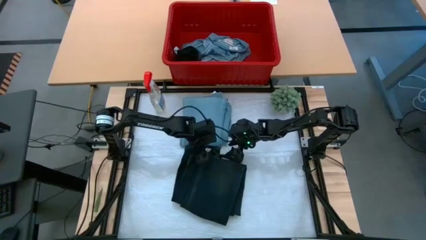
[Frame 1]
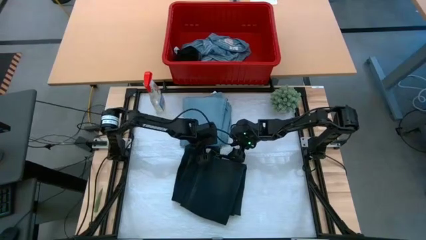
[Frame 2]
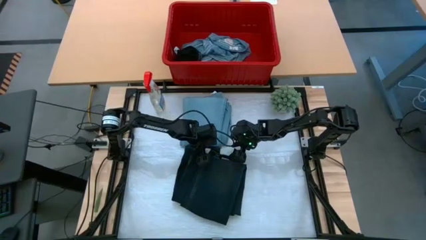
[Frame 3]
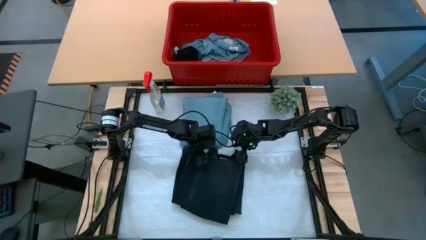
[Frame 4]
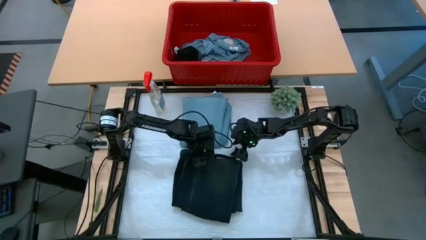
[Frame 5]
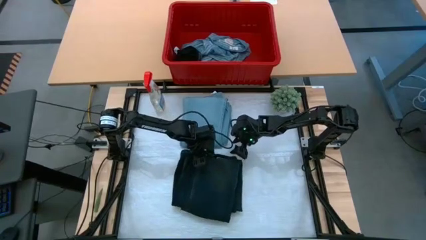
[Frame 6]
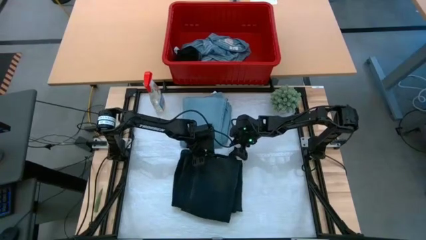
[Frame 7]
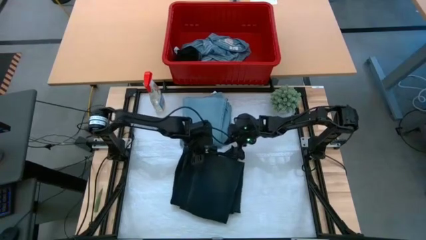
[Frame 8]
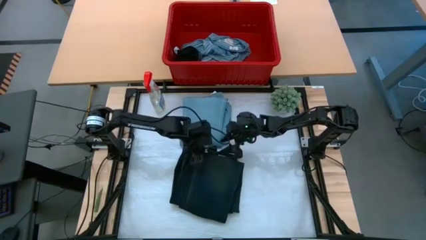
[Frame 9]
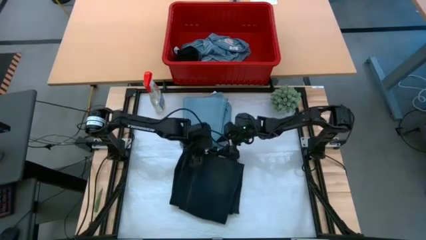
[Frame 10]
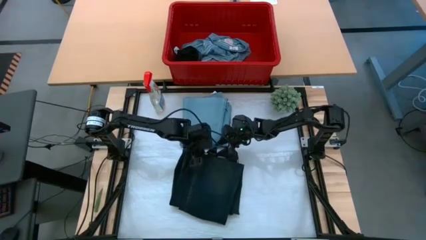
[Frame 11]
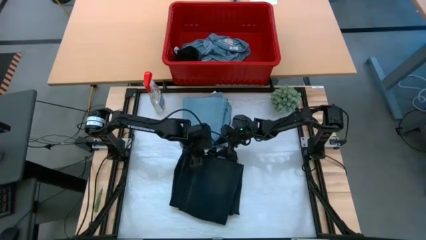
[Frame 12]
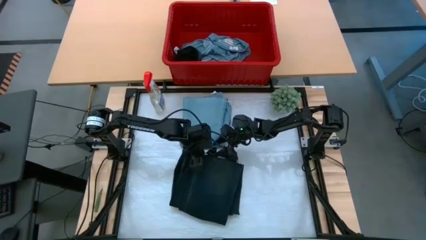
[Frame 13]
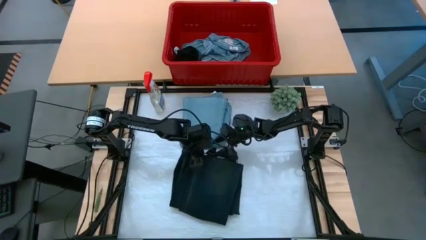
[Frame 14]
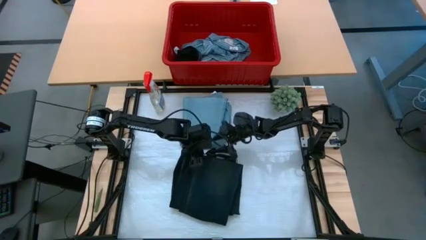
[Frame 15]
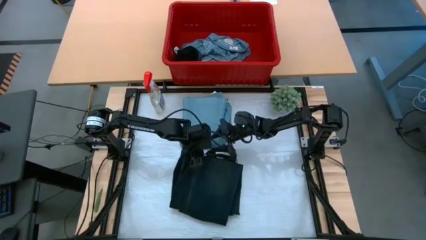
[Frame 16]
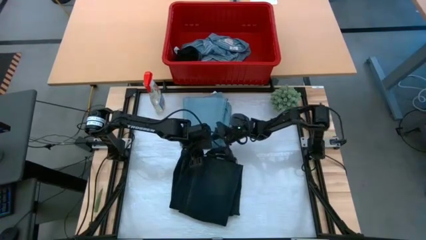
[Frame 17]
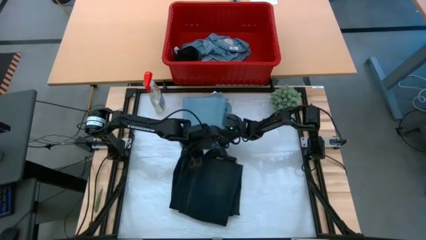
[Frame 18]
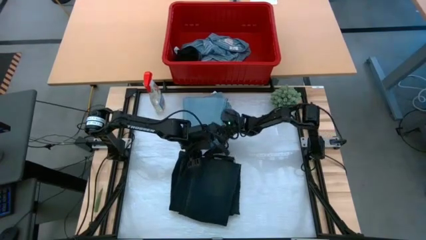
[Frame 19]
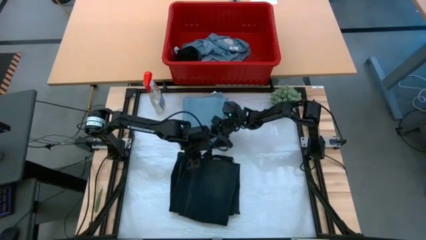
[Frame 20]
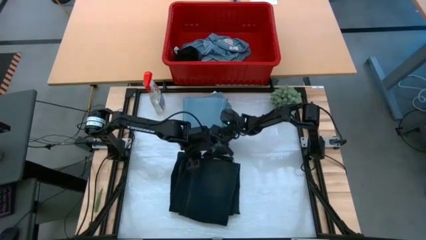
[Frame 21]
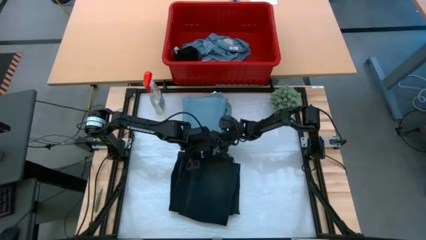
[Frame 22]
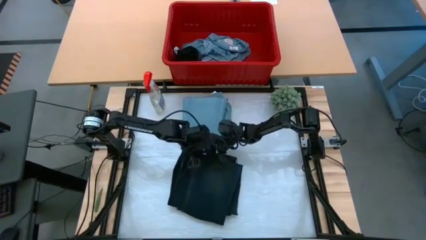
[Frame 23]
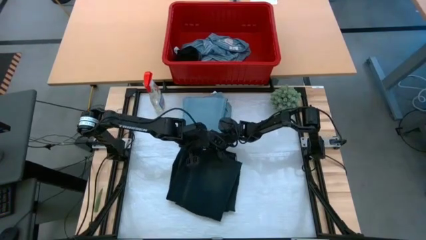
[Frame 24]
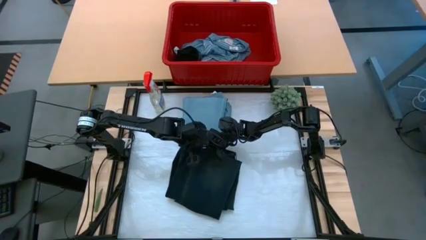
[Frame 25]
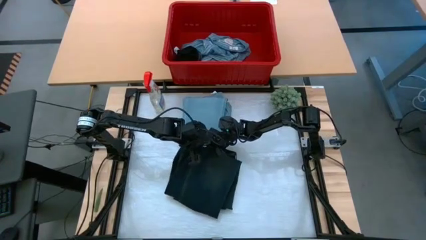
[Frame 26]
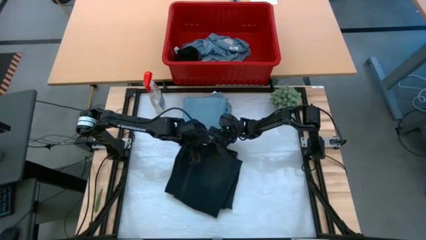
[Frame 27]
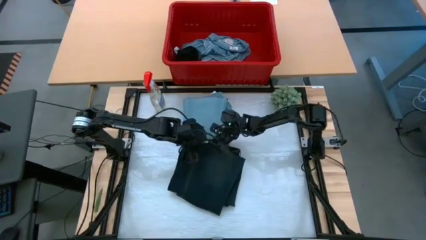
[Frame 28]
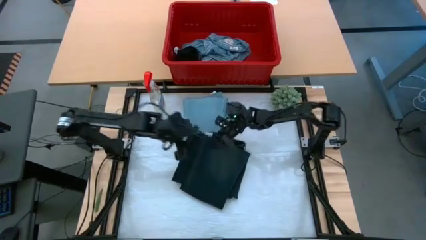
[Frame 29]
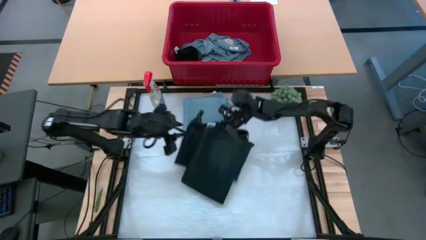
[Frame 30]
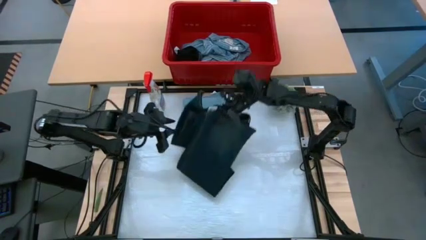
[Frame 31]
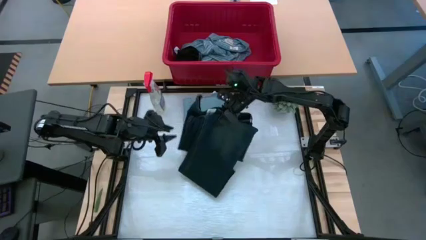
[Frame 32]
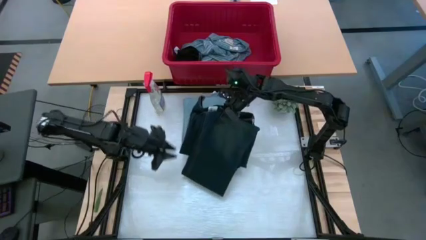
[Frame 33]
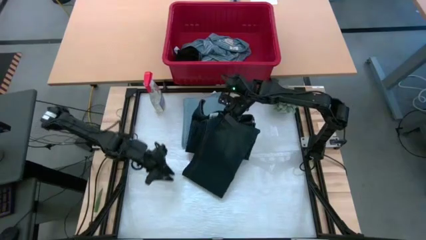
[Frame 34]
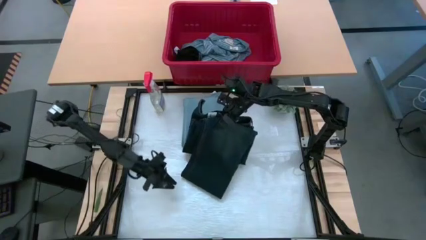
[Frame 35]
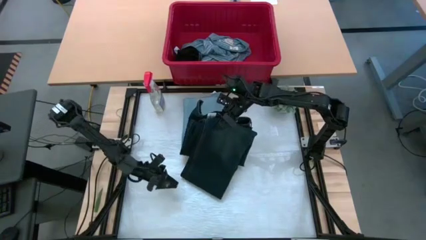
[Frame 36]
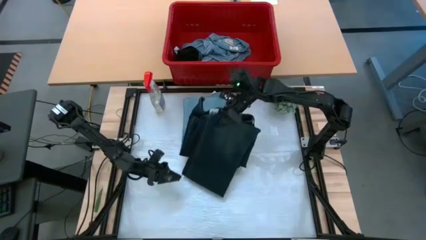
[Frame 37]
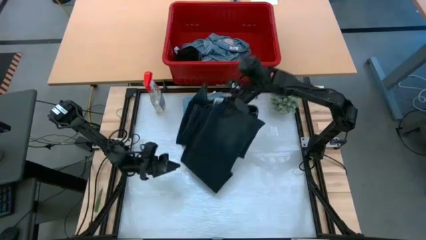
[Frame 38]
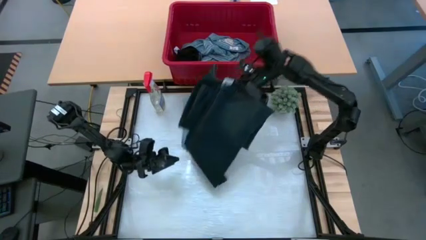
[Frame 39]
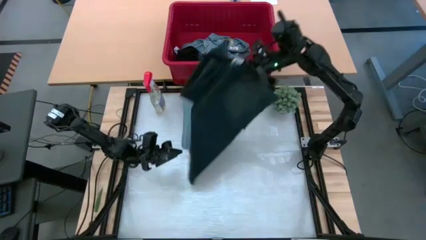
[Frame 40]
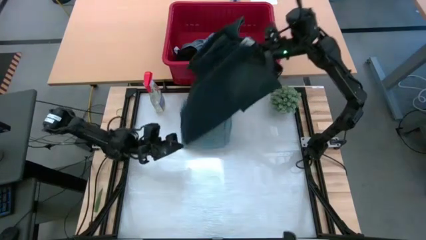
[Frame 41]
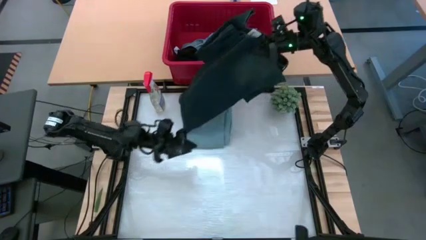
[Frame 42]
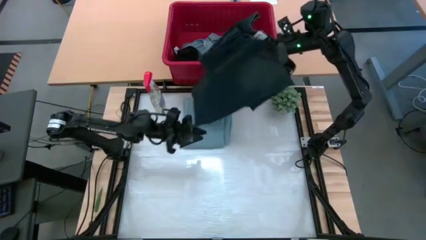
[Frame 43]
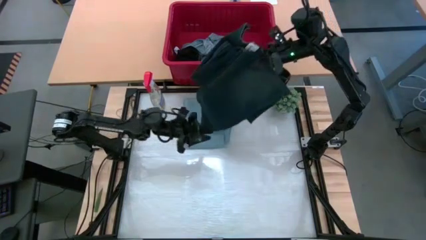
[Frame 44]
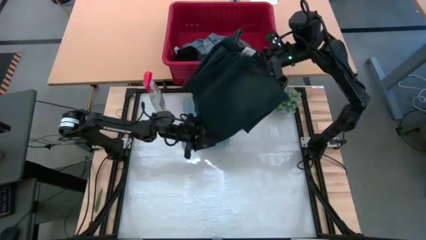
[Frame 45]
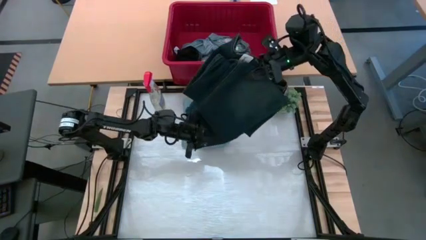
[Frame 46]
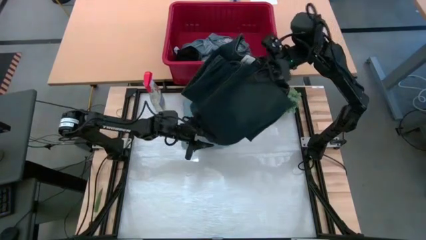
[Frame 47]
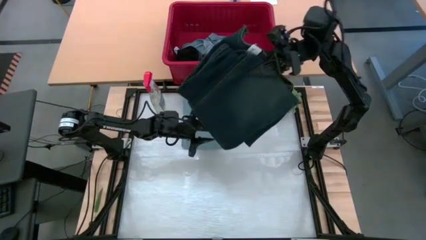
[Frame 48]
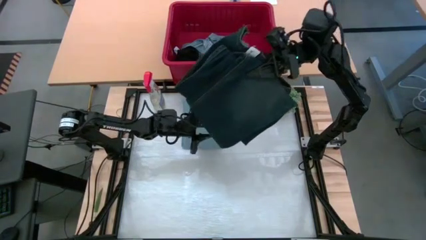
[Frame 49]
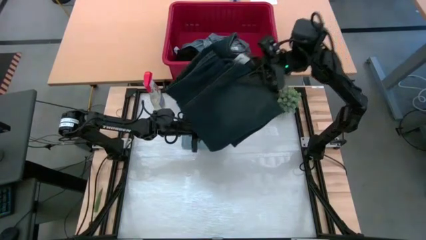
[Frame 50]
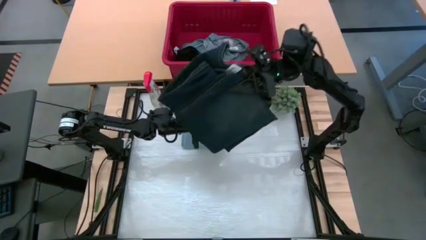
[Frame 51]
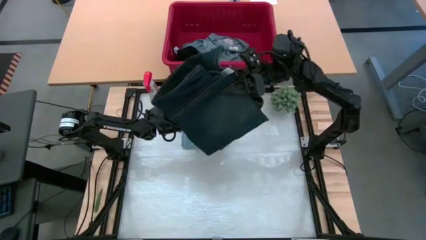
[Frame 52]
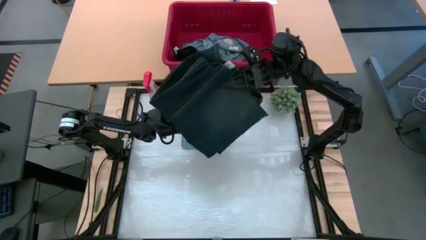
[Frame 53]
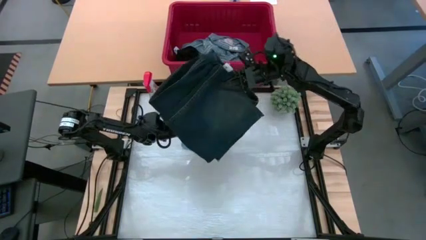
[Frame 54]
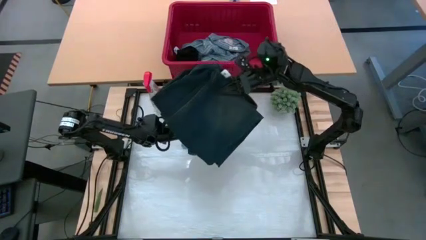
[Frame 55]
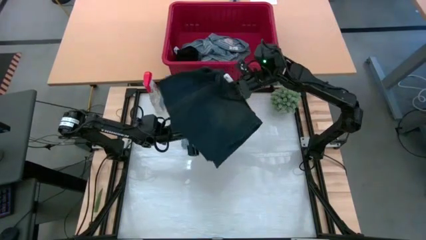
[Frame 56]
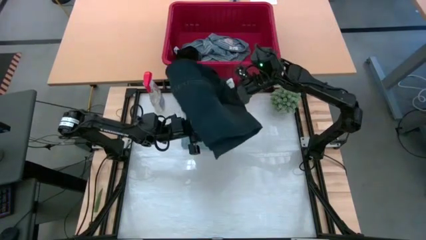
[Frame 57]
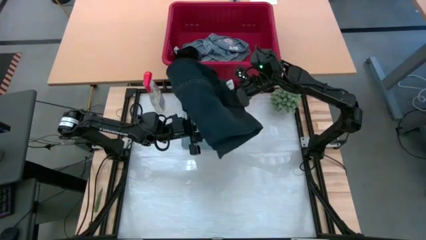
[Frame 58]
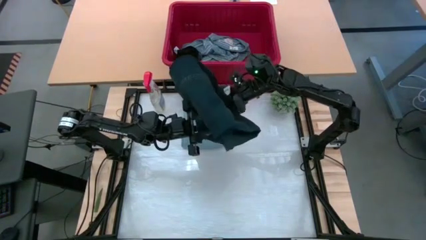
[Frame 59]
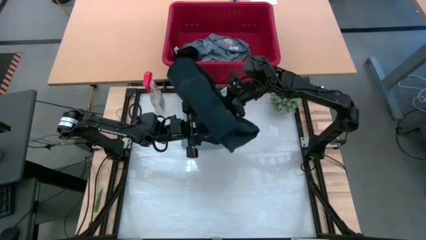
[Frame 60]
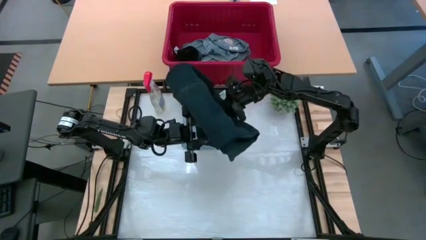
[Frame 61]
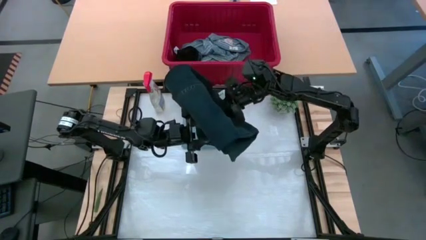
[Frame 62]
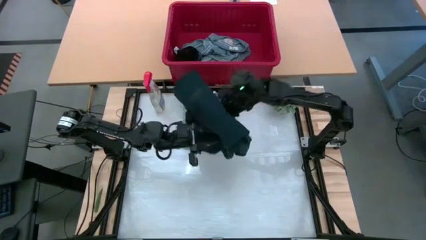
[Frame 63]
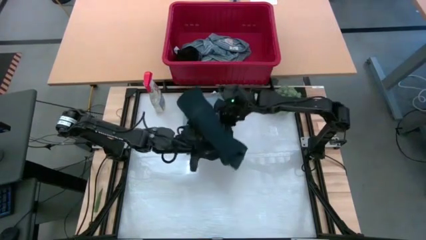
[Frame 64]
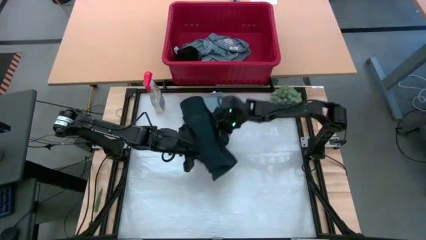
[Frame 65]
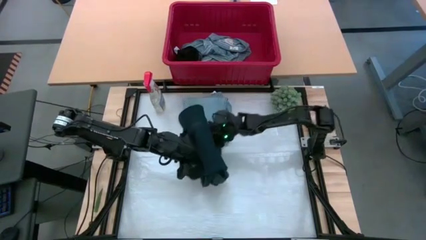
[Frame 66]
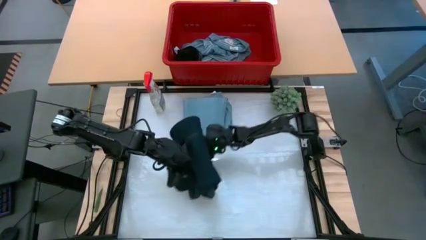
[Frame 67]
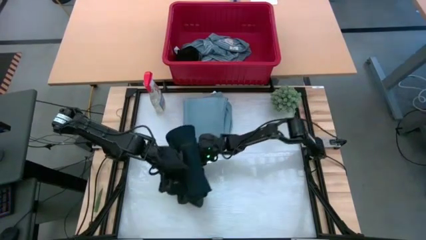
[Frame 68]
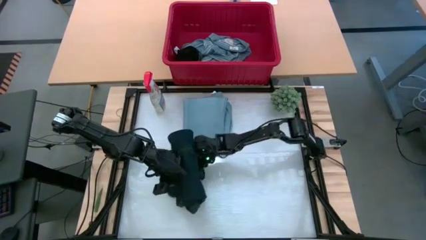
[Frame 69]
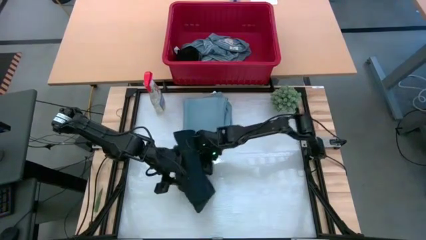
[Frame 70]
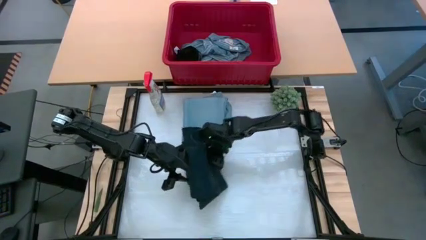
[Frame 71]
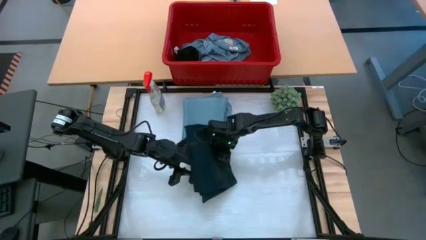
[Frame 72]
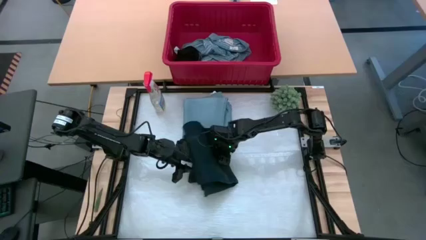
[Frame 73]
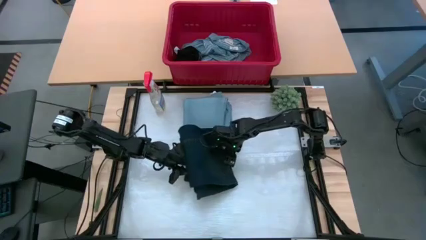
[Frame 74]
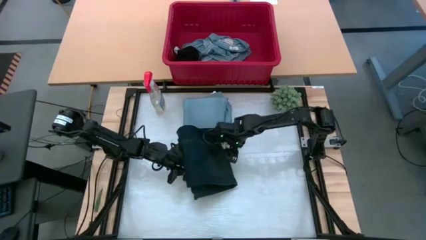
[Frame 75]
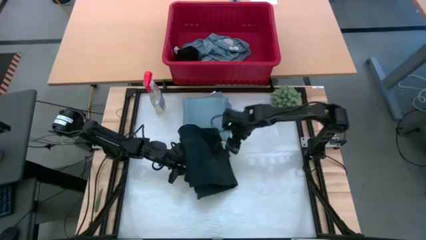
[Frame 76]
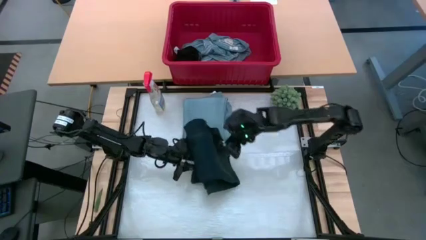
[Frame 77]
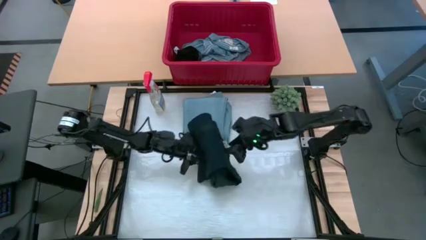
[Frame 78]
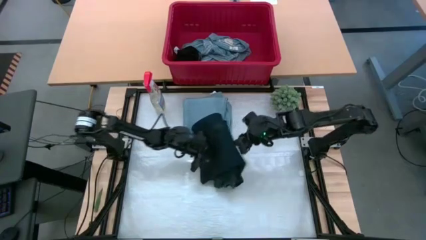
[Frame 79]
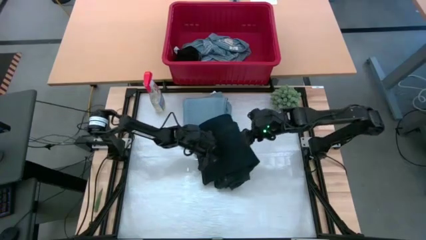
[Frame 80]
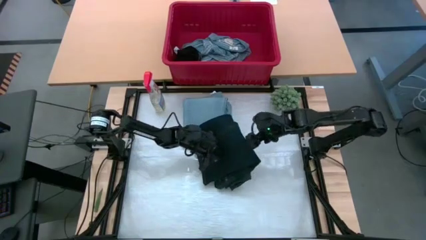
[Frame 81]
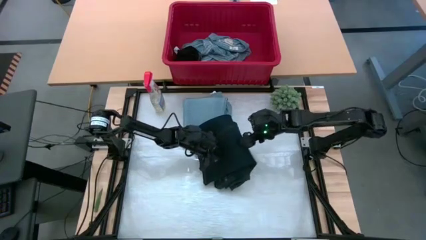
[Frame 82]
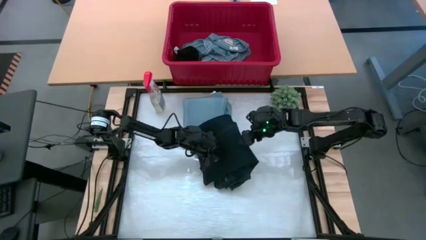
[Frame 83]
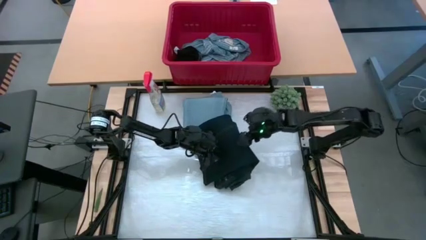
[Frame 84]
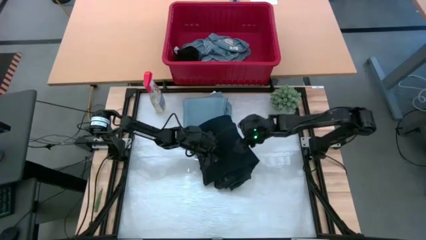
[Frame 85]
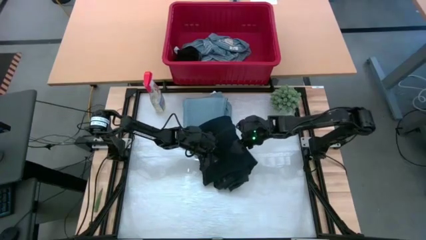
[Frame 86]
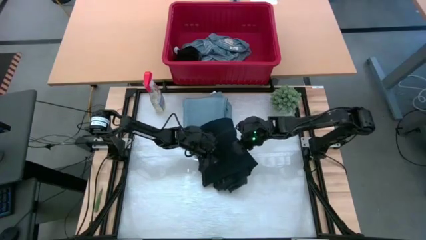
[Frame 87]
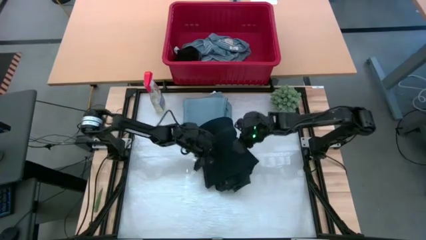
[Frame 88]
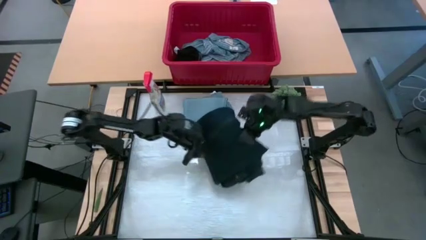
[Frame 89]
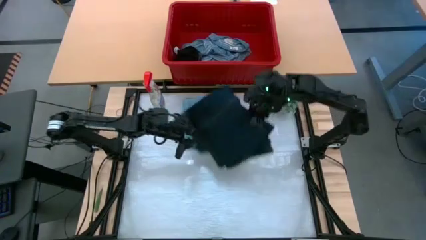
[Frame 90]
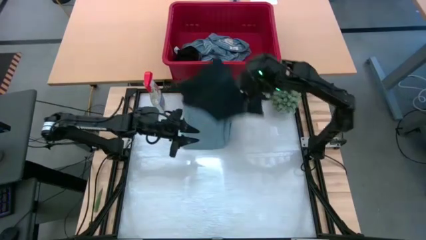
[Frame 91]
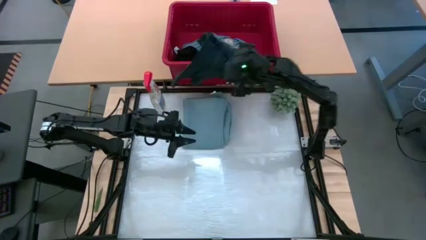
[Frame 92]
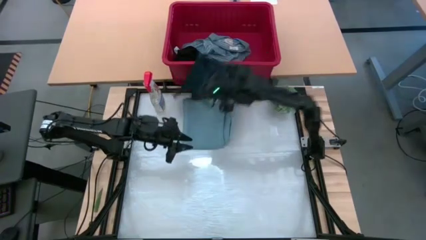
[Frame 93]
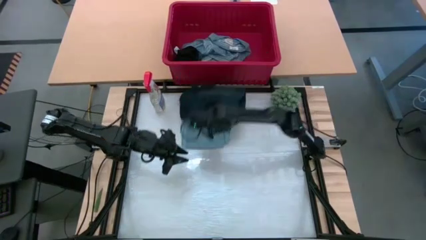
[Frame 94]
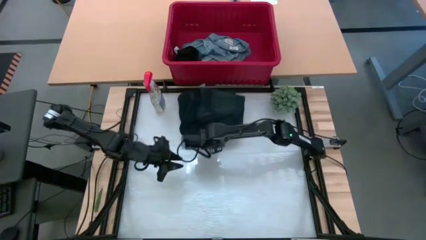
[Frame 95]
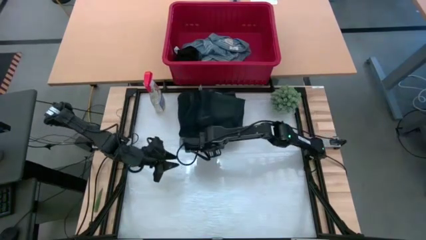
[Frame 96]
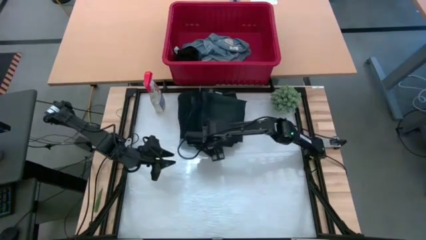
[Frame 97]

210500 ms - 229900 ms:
Task: Fold Laundry from Bin
Stack the black pants on top of the blue pants
